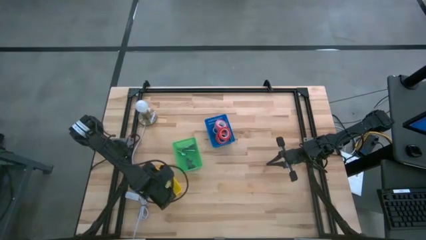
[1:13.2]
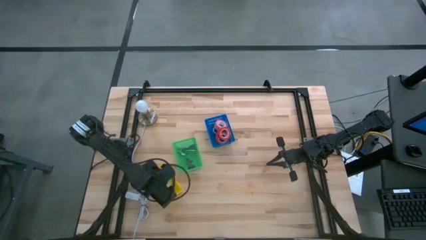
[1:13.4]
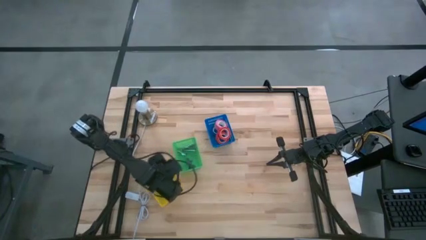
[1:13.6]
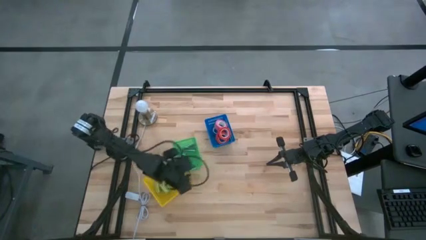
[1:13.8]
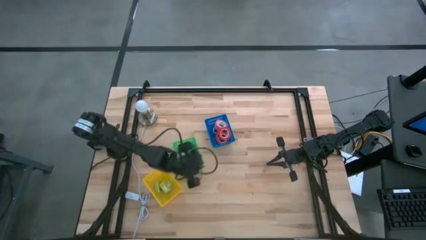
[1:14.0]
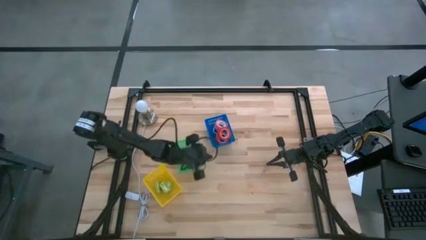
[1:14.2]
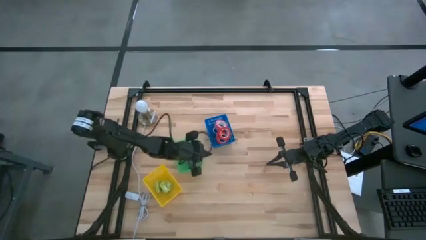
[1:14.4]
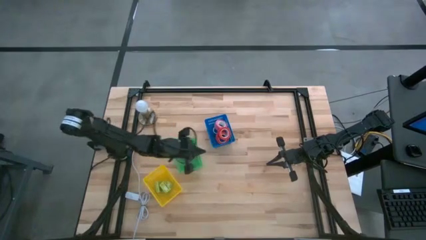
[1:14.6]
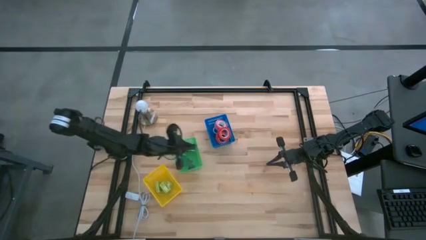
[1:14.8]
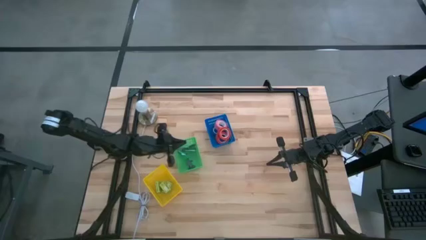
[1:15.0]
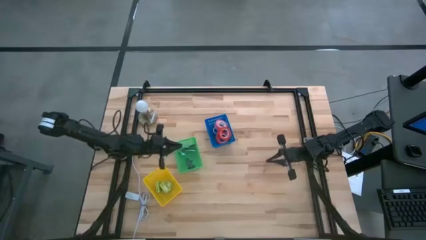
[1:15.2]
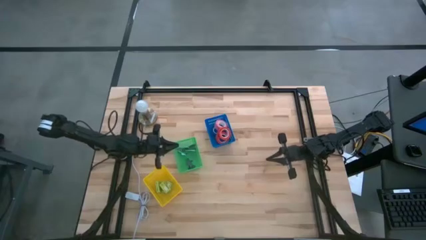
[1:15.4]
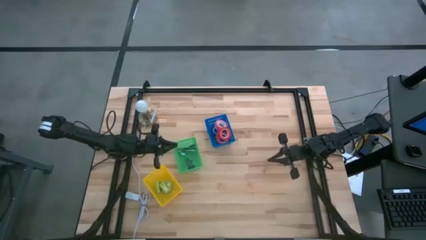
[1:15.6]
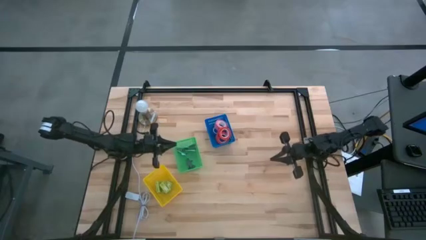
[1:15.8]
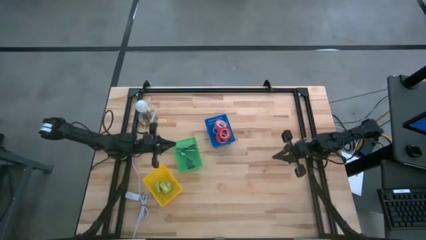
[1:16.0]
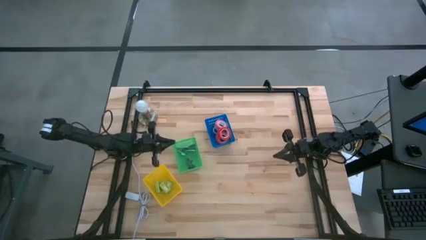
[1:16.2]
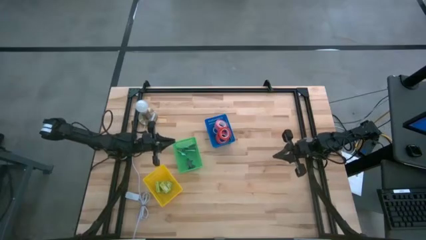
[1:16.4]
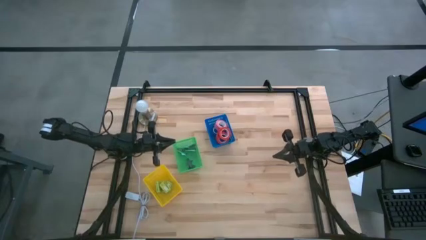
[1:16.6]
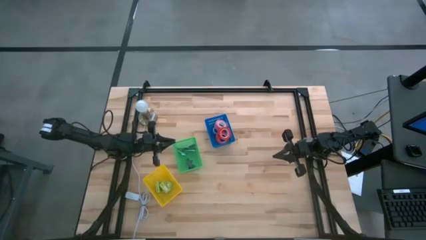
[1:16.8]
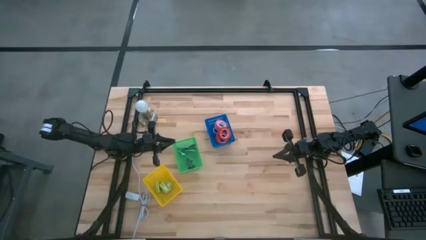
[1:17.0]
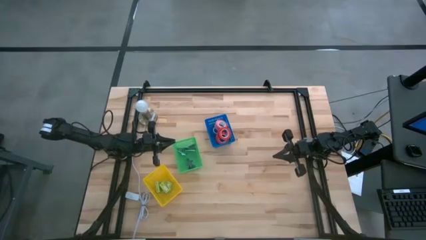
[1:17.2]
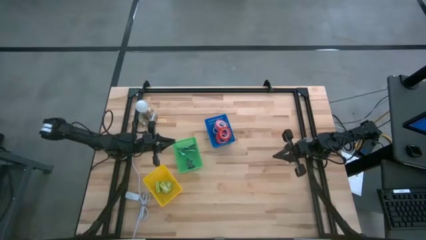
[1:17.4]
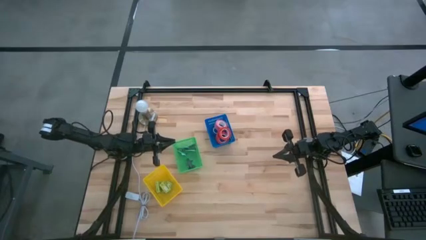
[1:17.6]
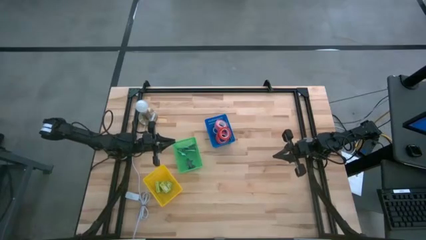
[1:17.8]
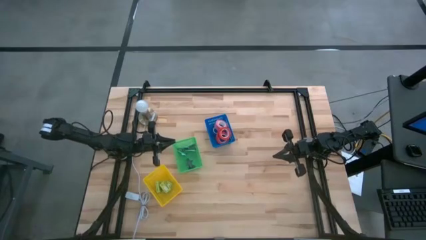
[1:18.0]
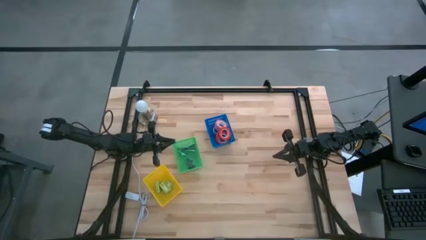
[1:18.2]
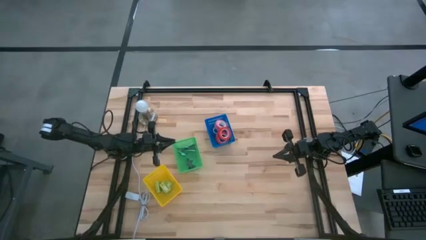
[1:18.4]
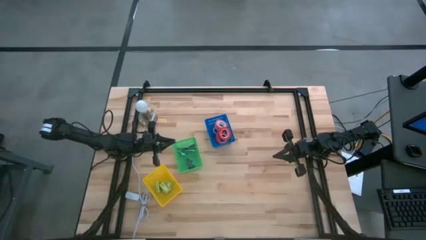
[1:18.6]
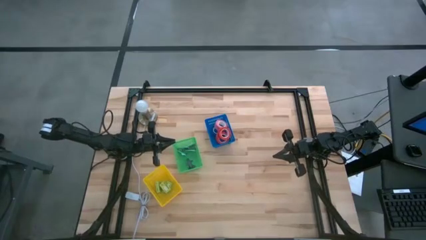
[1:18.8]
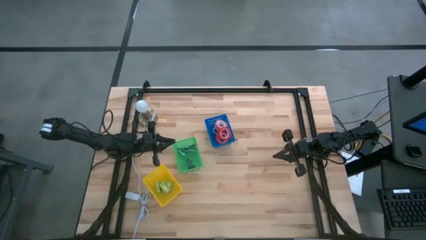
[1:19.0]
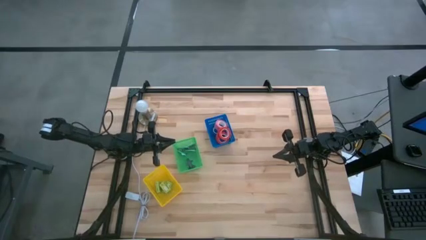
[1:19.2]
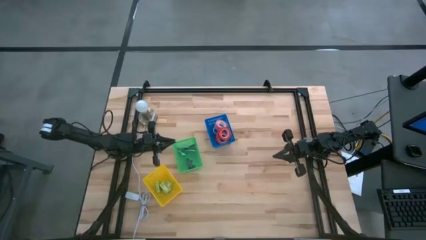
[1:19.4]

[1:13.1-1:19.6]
Task: Pick and place Stapler, Stapler remover, tape
Return to Home Position

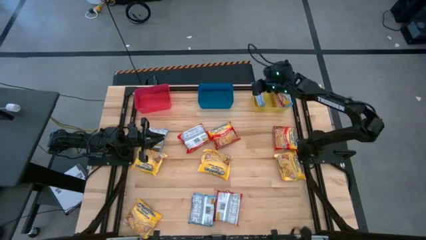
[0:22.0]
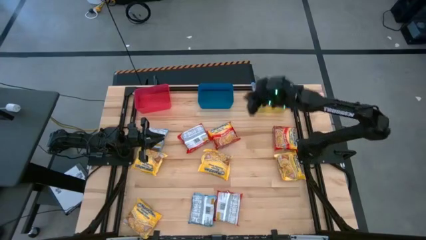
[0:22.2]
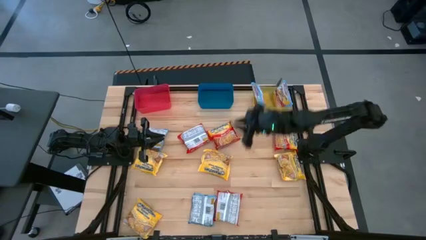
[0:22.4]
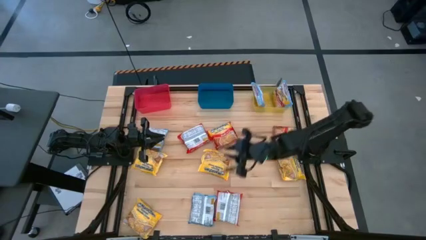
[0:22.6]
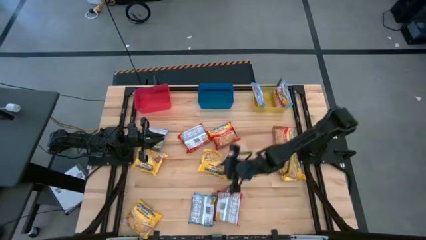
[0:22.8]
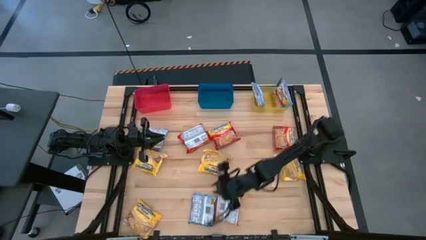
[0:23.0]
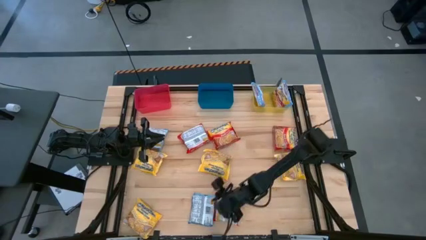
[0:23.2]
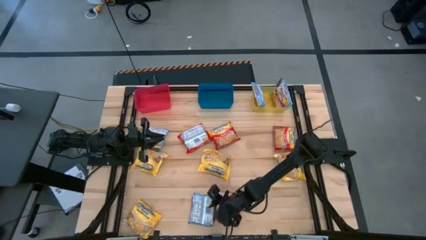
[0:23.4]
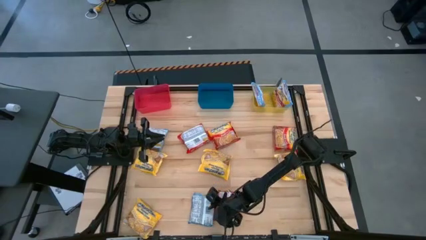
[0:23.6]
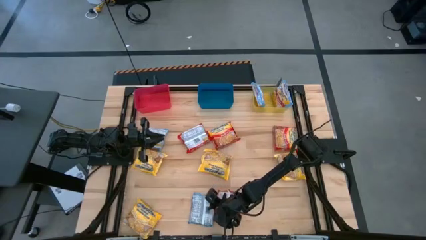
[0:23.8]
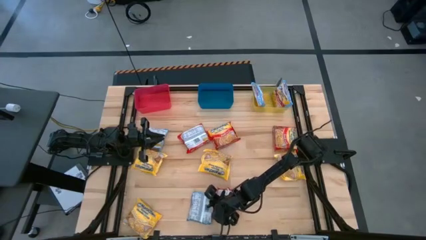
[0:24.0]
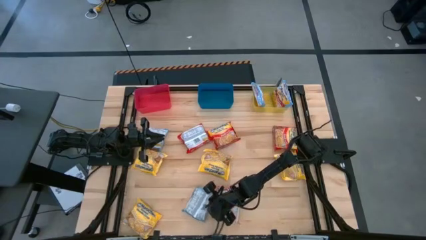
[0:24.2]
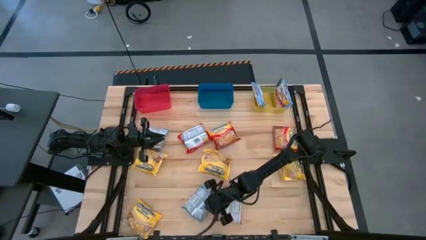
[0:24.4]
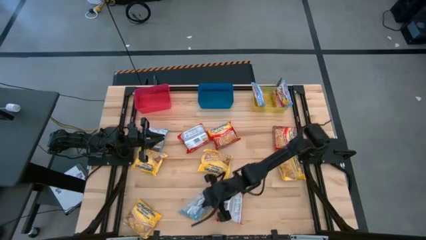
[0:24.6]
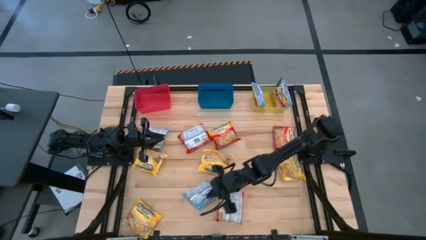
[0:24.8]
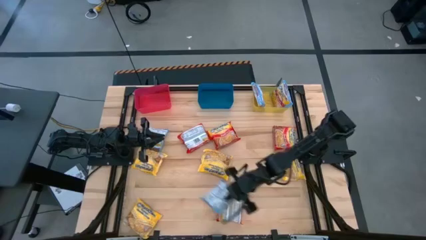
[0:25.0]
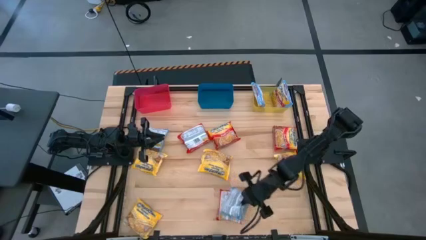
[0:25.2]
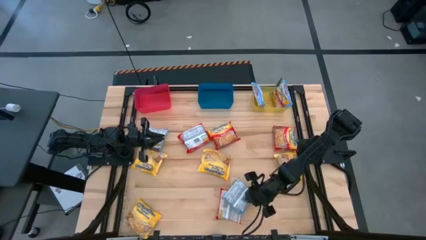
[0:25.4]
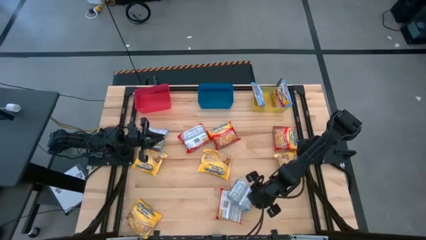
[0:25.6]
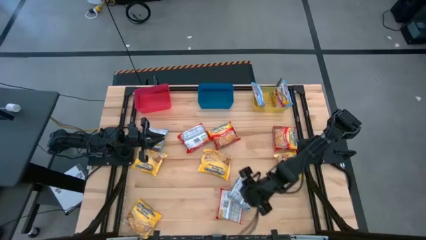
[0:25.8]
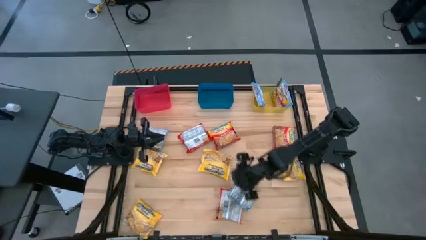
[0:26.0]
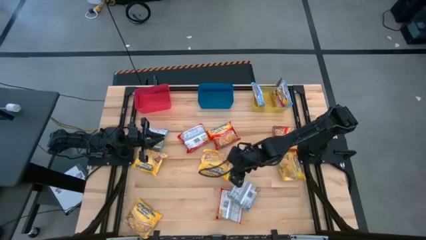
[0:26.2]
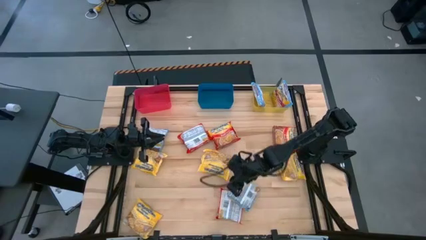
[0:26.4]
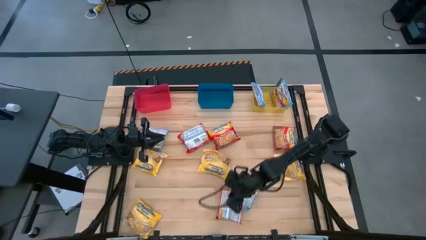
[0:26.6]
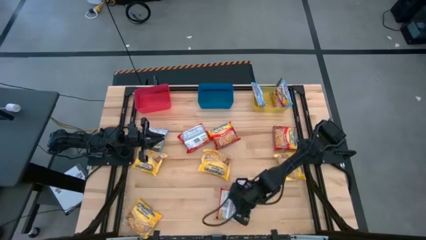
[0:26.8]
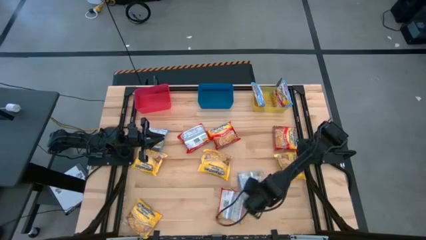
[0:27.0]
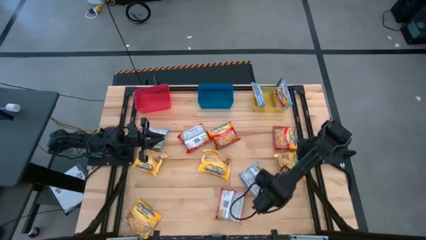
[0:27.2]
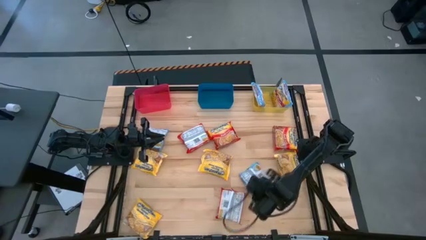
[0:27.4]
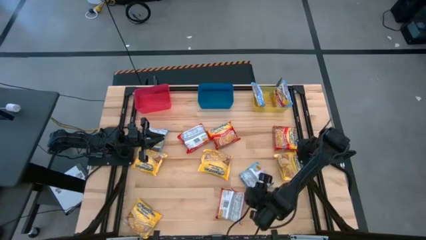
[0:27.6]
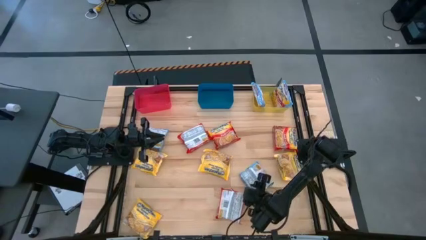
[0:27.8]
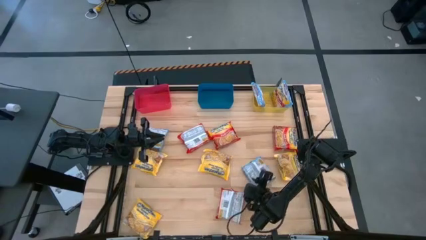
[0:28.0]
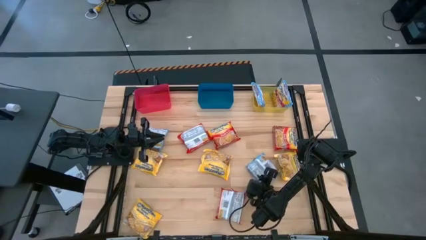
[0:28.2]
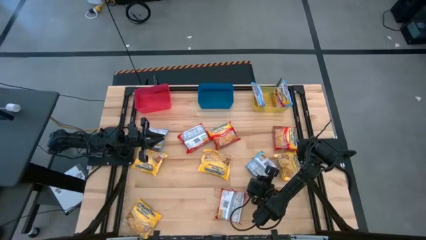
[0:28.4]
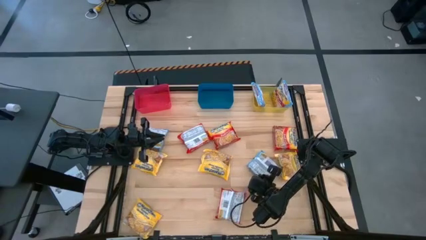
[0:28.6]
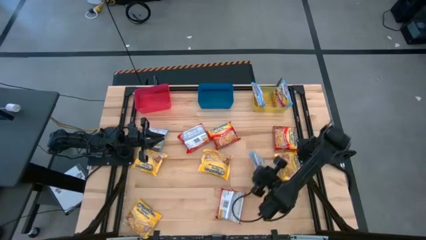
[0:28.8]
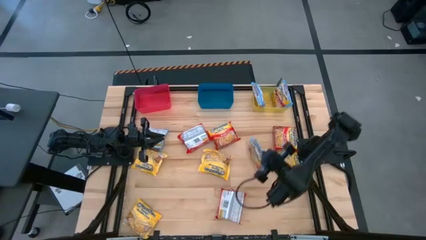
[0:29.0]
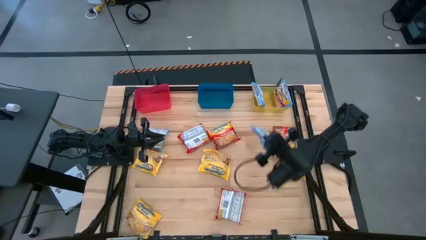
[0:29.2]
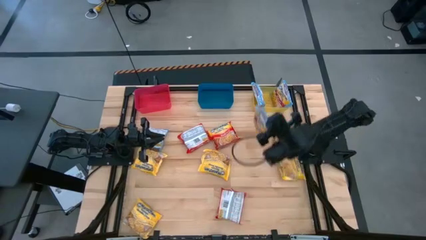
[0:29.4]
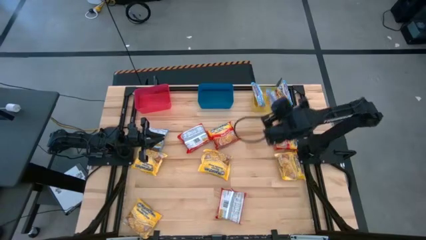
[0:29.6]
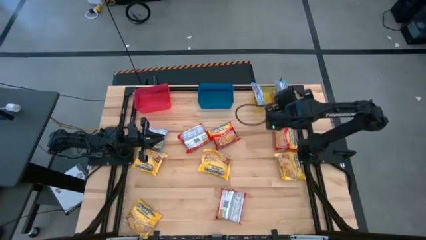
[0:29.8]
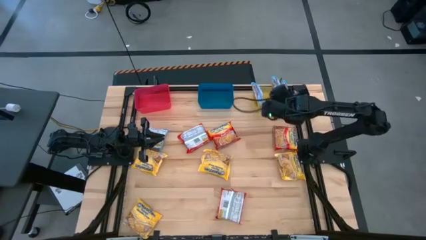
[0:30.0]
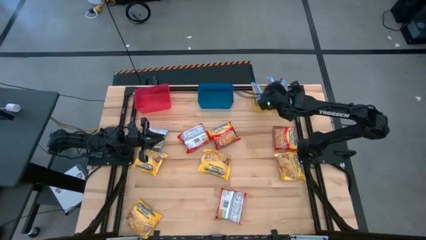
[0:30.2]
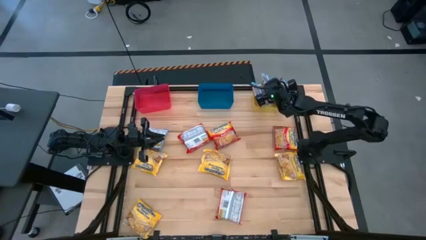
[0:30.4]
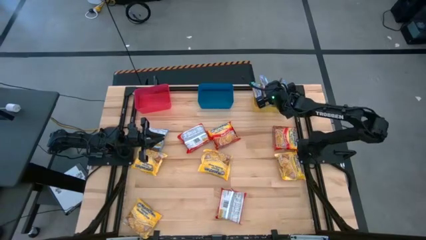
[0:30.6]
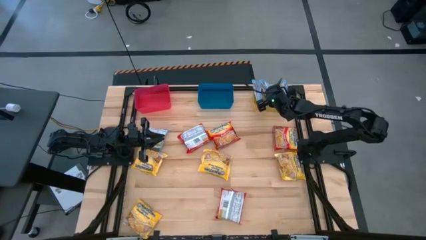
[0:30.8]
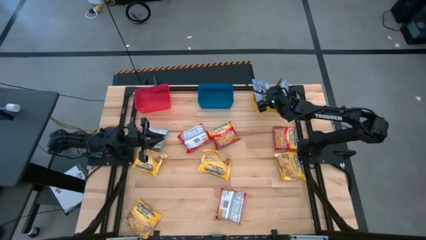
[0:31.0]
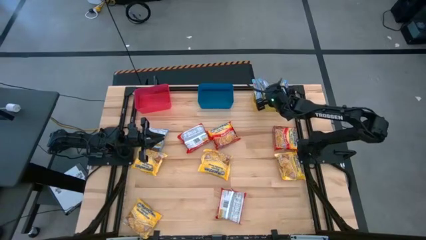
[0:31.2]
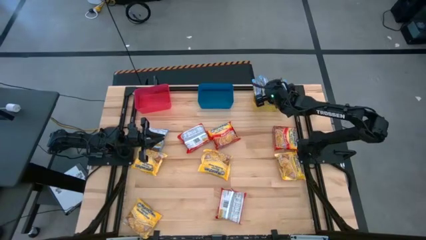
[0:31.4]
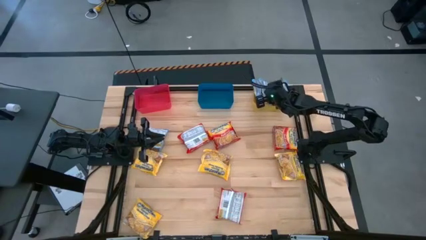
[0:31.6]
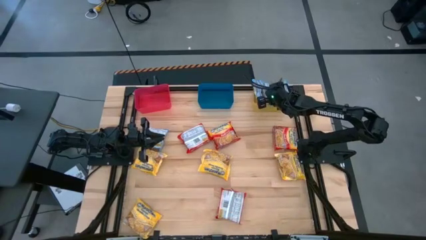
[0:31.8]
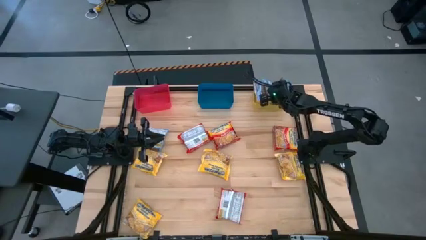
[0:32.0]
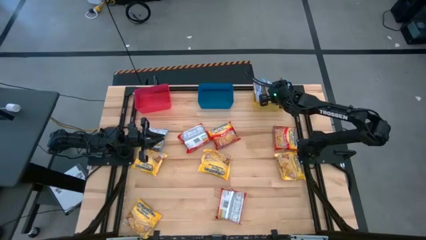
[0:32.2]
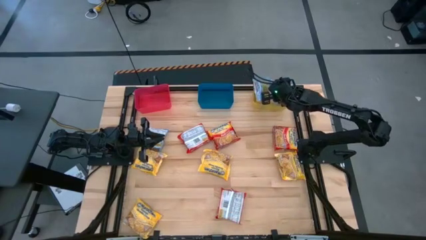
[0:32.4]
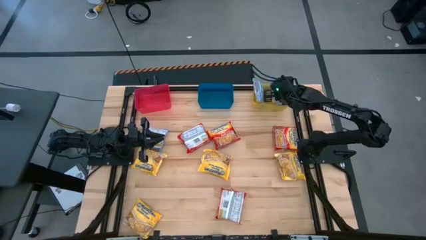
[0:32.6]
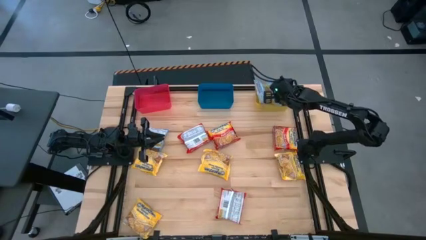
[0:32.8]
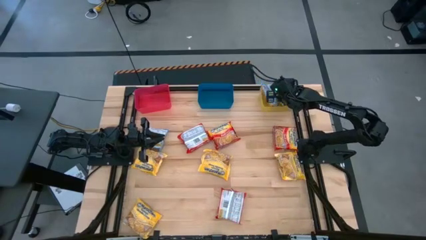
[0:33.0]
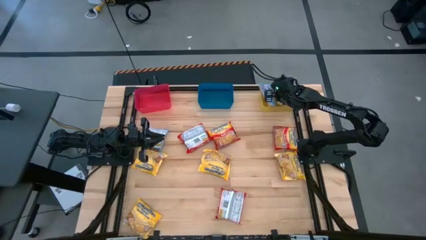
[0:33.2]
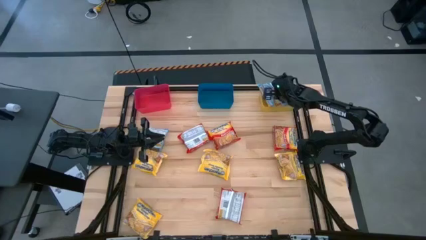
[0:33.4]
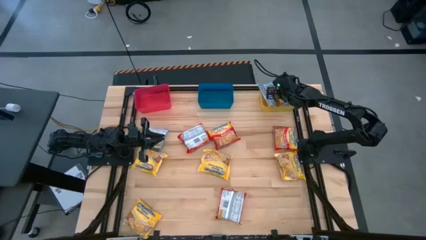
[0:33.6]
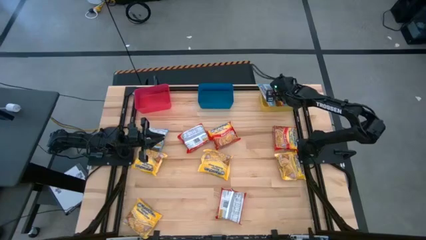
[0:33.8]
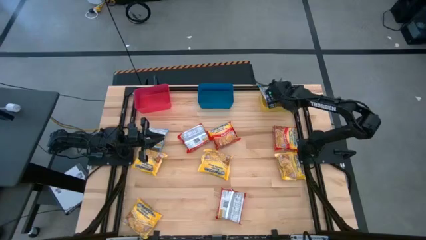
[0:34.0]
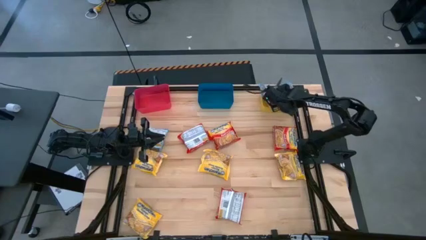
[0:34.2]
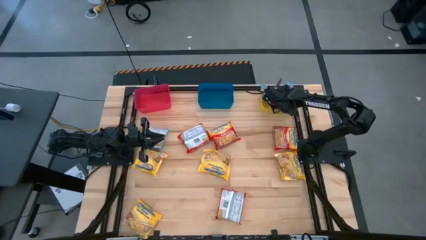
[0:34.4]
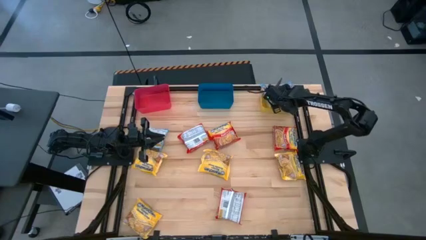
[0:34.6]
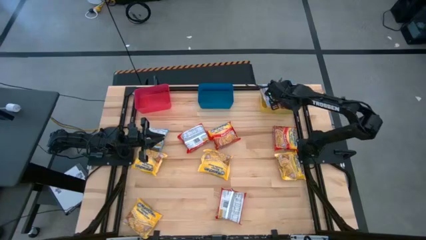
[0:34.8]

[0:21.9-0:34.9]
Task: Sort Maruchan noodles
Put the blue noodle pack into the yellow bin
